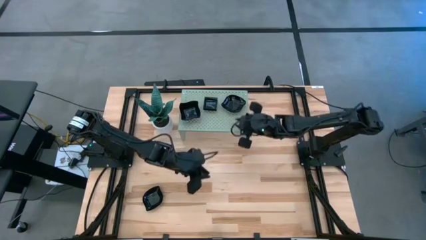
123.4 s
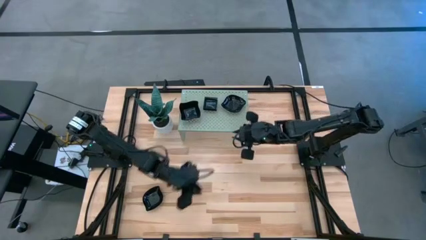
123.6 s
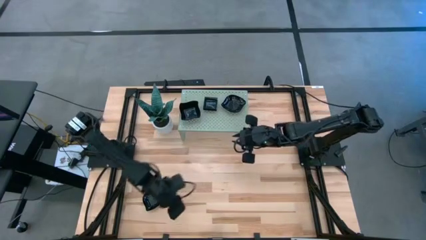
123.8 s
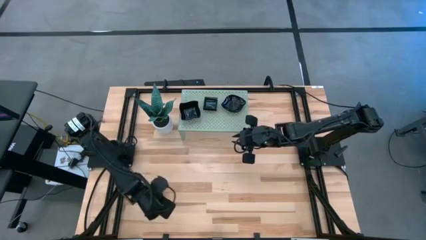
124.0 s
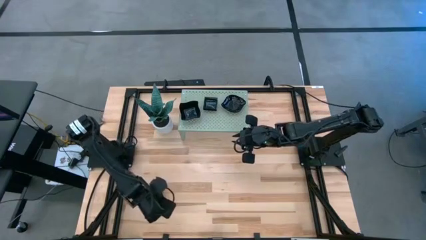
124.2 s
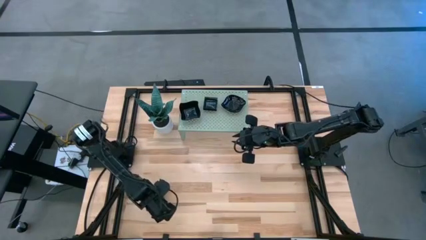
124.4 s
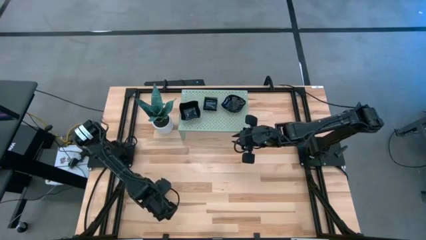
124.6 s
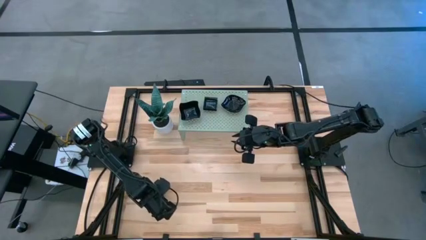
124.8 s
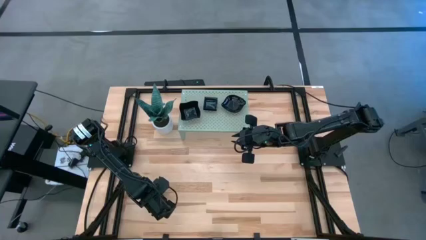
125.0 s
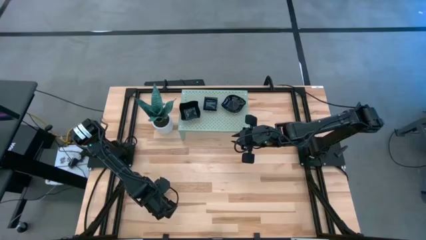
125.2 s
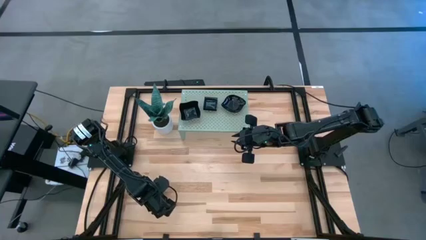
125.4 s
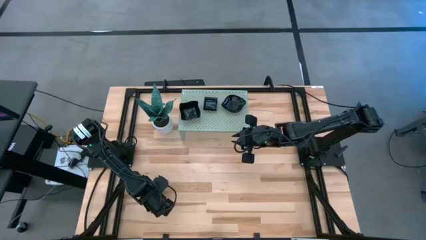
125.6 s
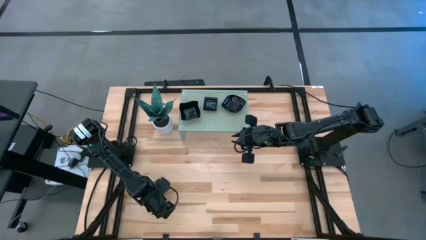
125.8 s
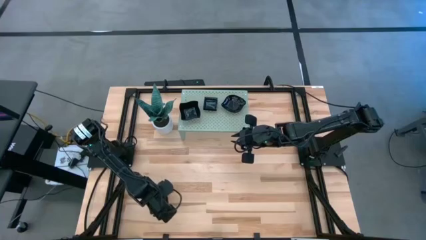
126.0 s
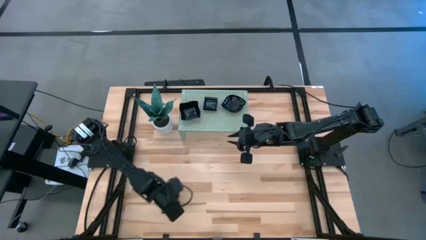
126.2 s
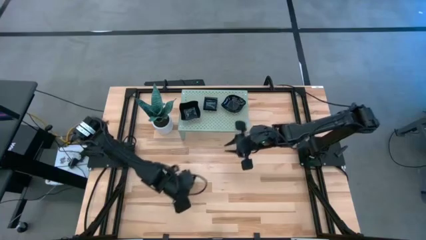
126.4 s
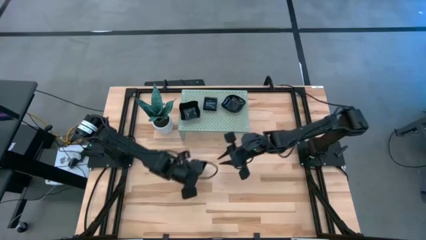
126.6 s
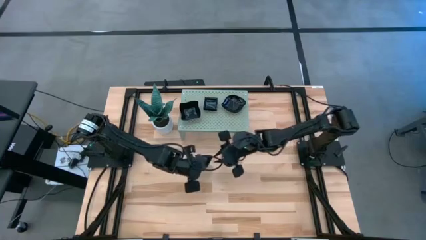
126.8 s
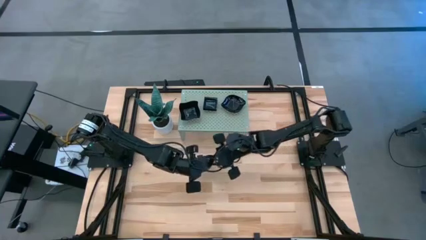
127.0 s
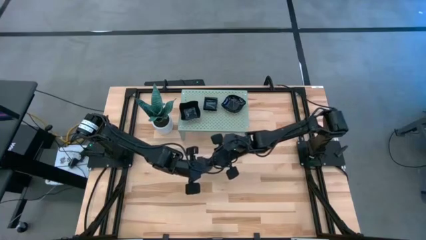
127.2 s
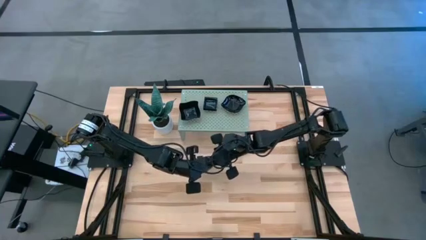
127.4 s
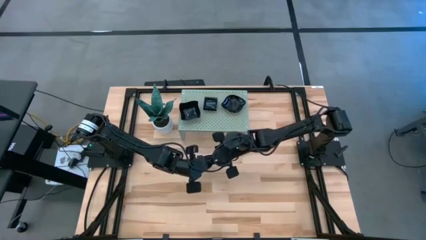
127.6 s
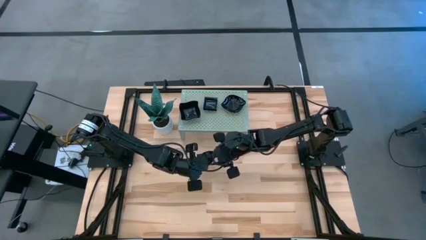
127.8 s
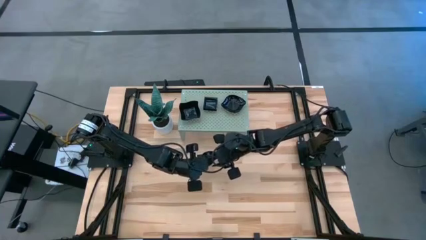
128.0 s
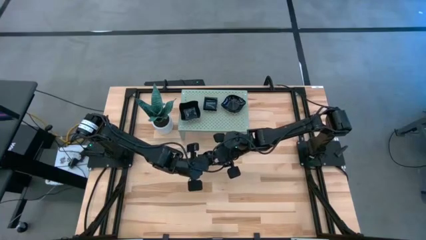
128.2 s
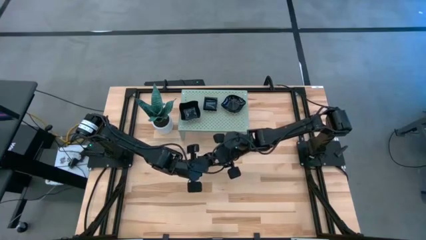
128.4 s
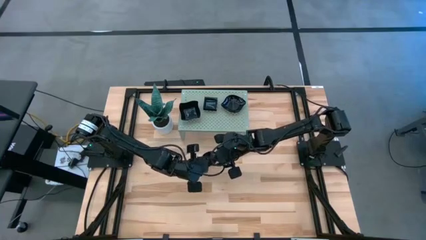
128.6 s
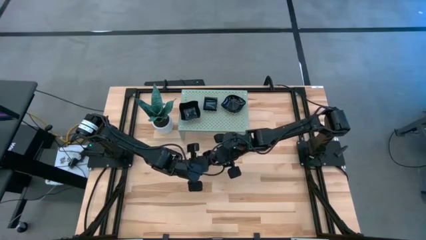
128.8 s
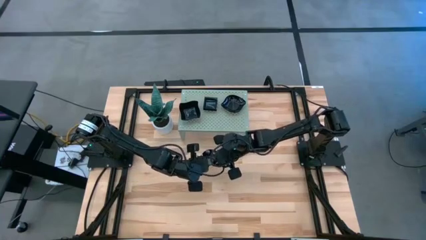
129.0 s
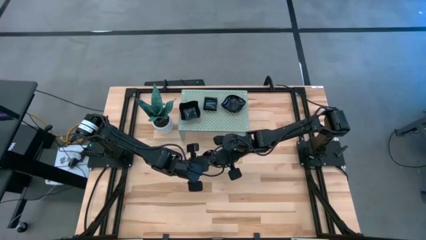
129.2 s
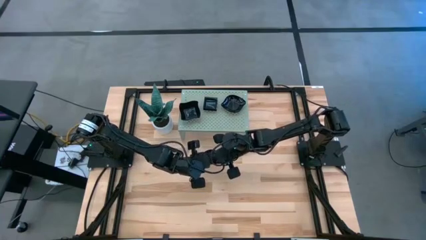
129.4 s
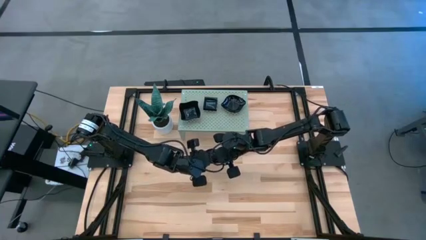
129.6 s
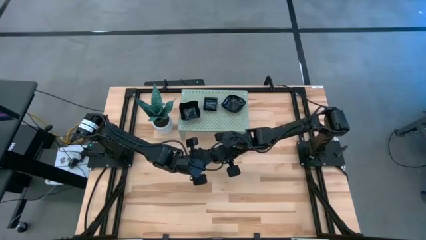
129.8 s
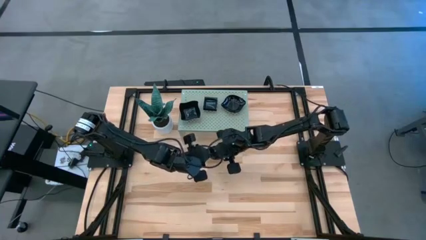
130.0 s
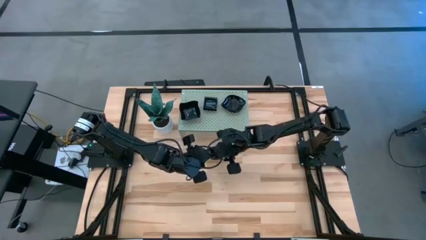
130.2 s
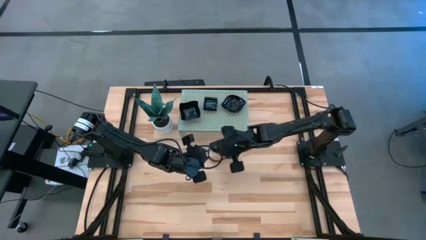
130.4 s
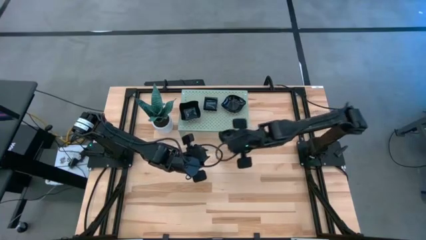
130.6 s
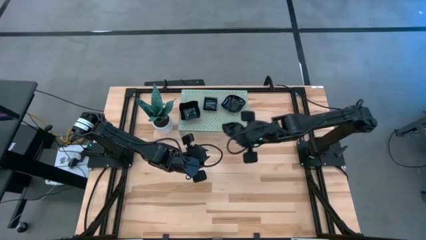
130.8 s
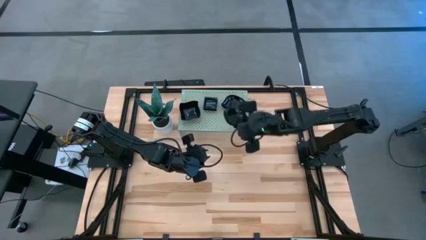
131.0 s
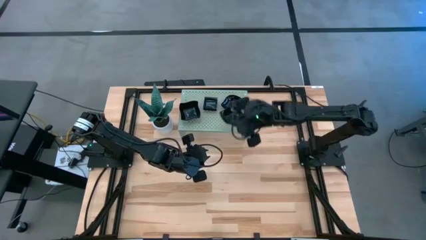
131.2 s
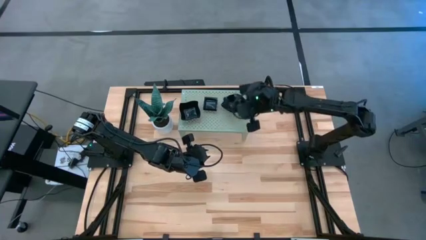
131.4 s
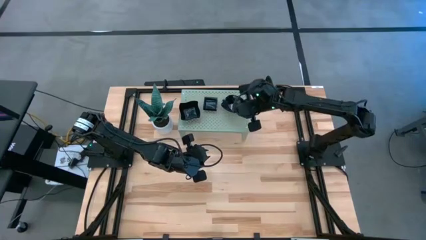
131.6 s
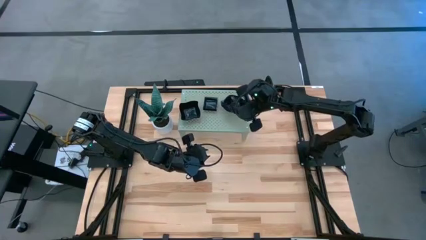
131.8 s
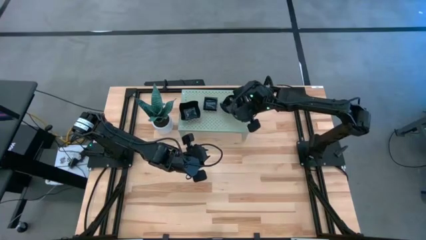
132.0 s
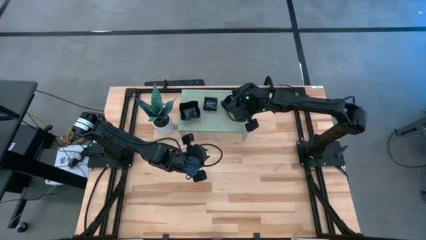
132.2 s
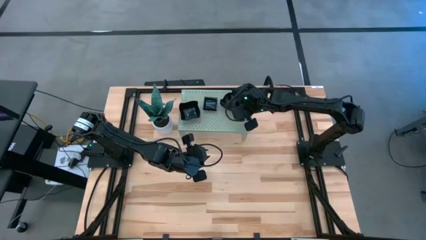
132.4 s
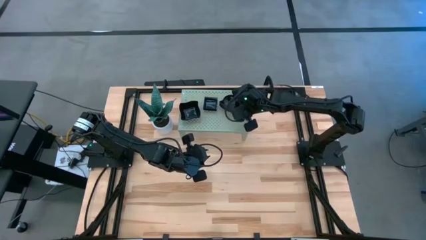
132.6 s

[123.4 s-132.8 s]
Task: Pick & Place Mini shaped plates
Stack the leaf-shaped plate on top of the leaf-shaped plate on the shelf

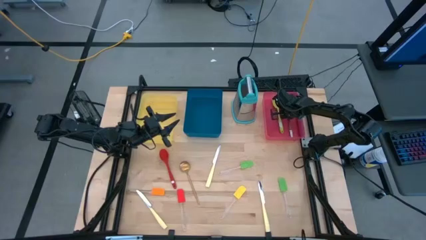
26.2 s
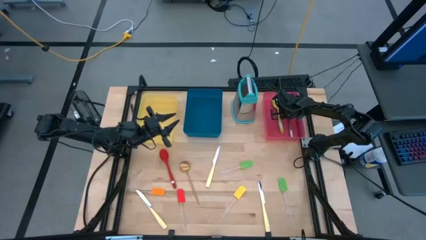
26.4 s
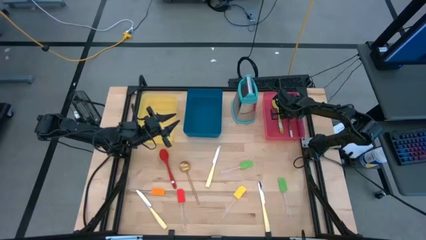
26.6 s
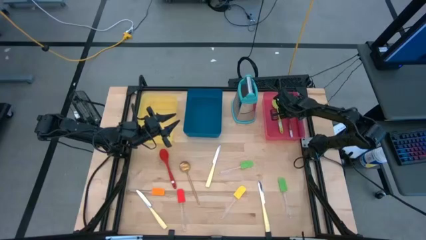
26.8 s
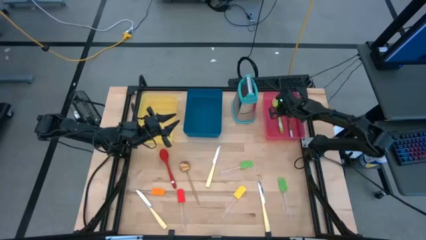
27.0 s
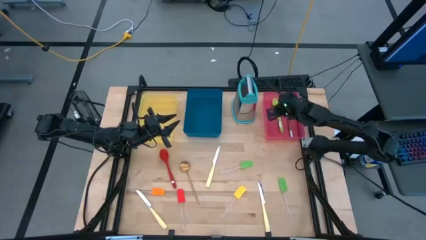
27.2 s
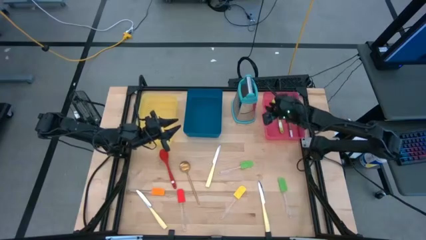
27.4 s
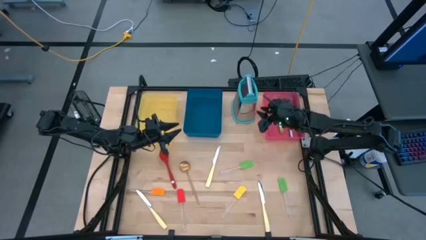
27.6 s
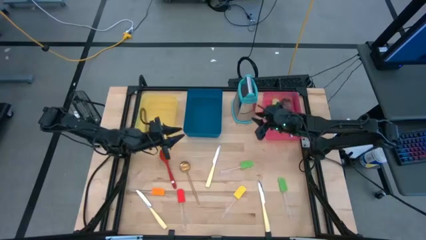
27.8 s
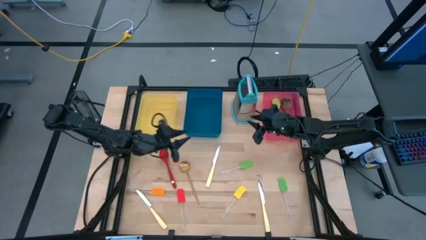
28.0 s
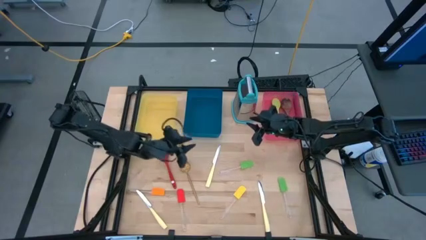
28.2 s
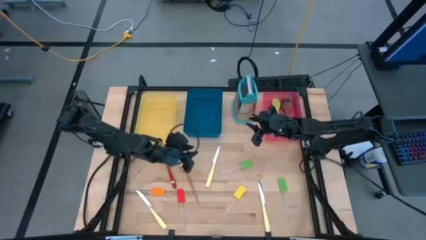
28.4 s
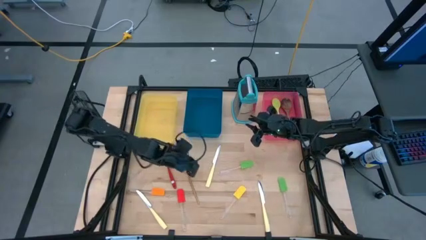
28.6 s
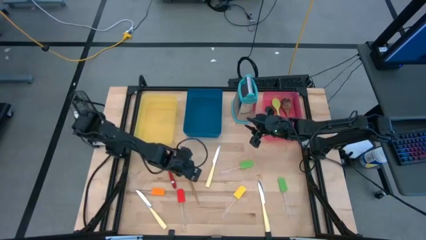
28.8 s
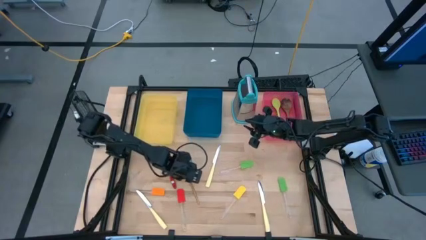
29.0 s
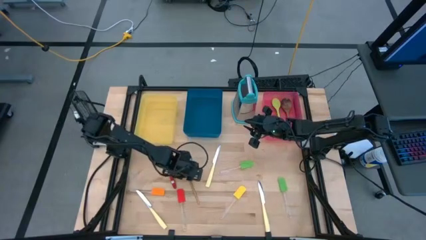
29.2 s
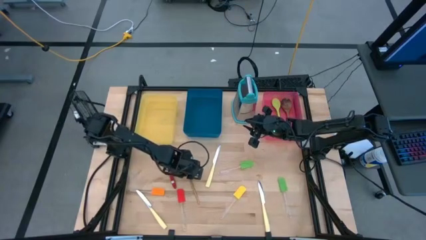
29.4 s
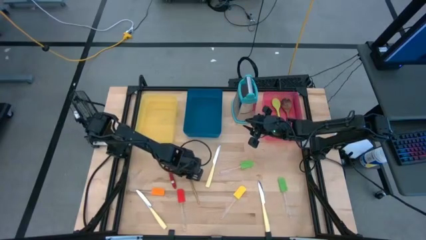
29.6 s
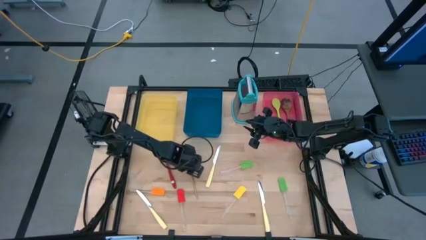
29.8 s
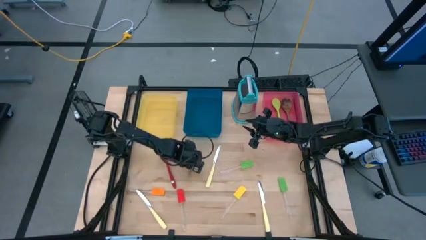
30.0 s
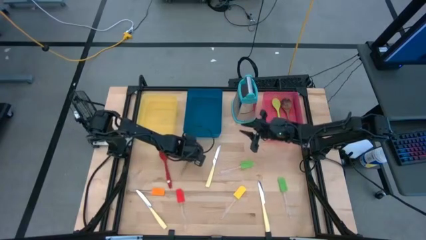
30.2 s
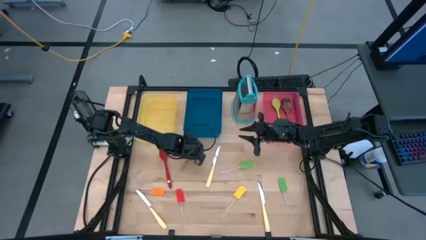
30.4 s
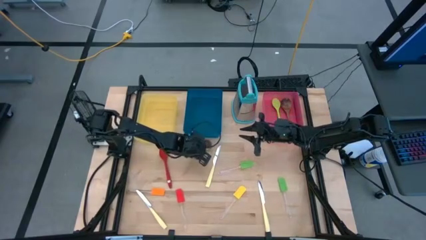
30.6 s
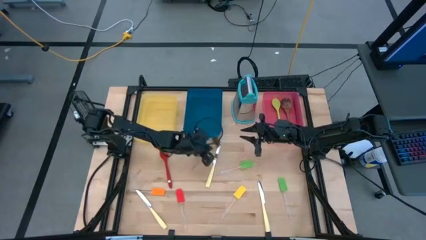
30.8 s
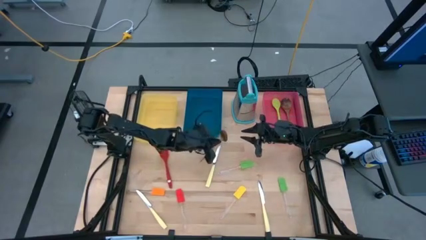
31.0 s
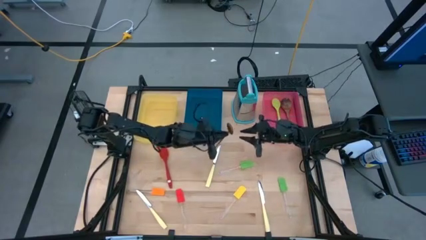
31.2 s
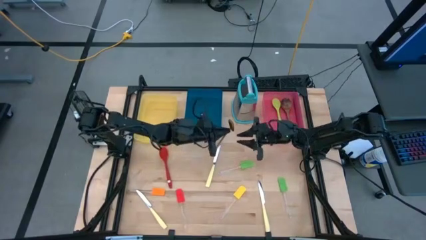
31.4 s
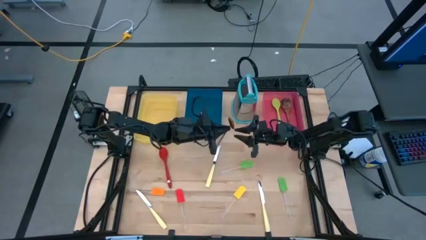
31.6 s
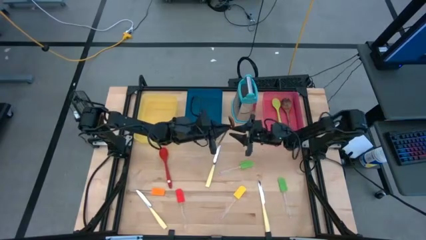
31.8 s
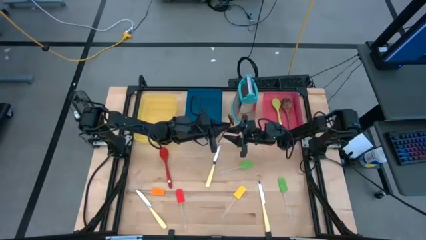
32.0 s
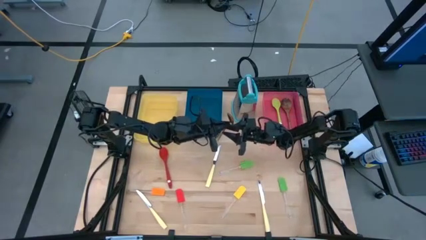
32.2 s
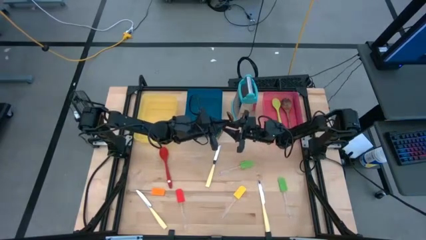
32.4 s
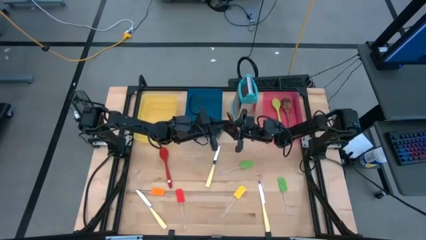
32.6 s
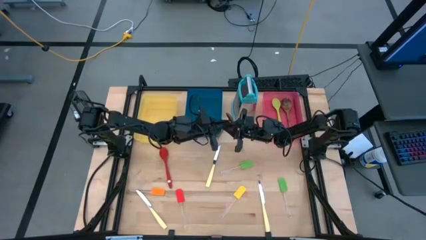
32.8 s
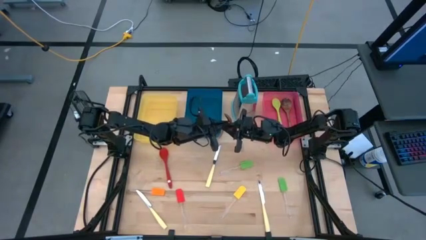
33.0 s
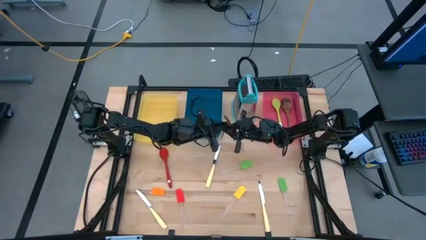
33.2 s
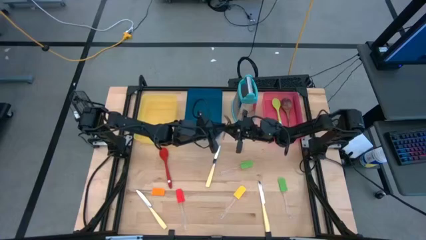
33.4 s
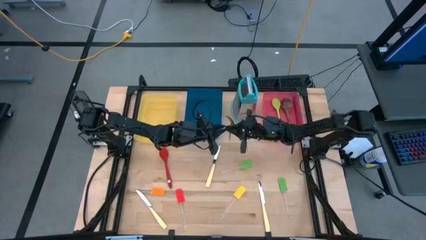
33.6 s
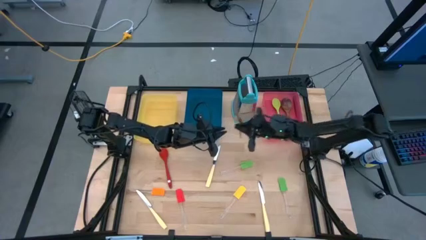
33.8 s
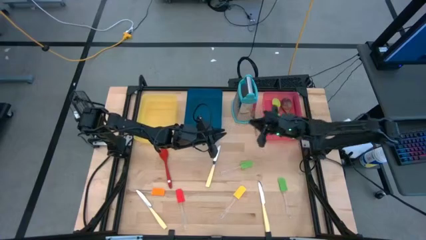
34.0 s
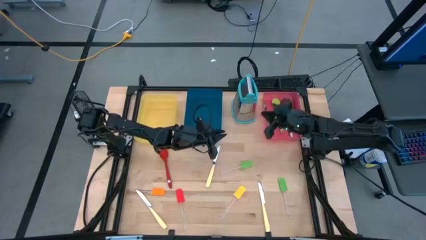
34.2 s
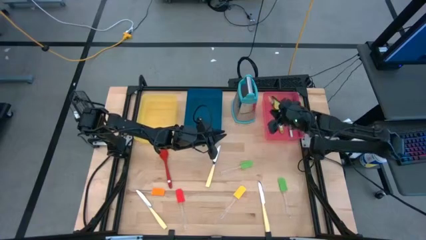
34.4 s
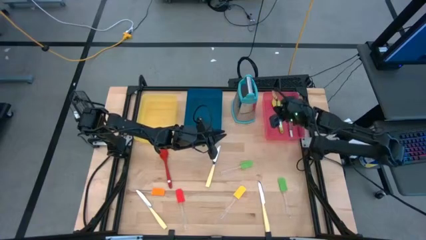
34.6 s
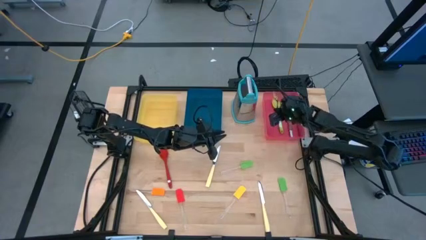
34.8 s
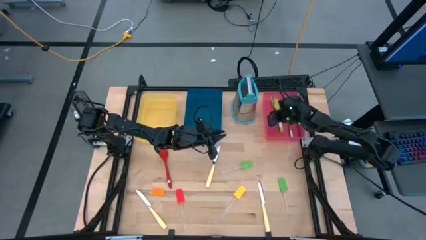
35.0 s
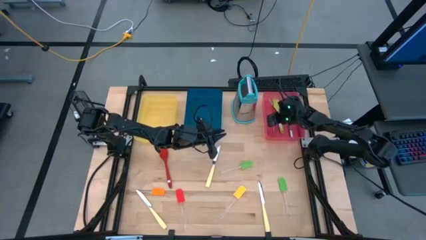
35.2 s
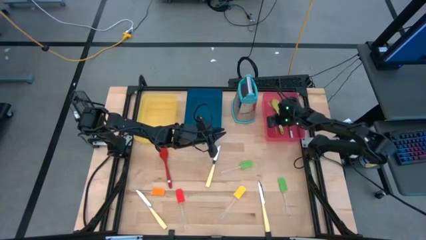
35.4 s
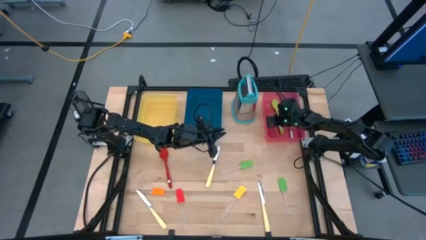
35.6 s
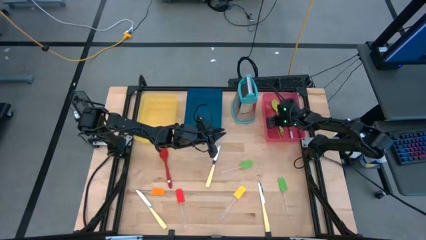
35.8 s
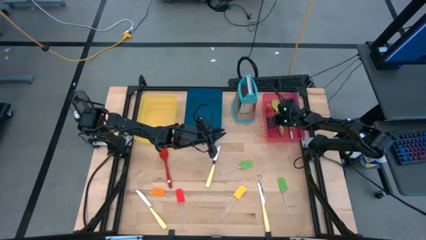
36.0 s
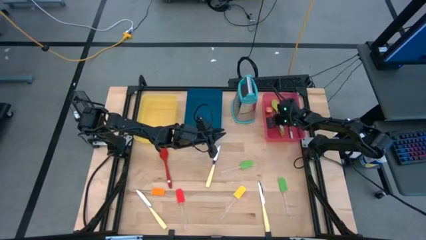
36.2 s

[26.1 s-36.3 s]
Task: Pick & Place Kitchen Items
Put the gold serving spoon into the pink bin
